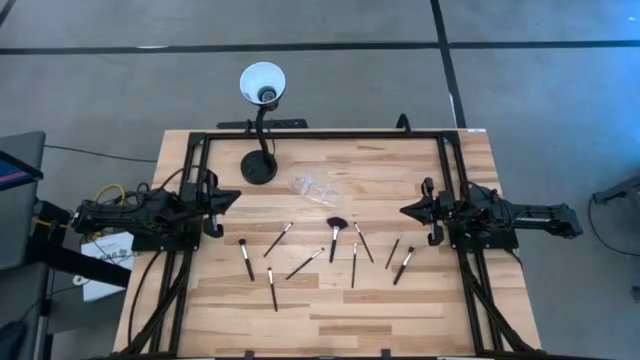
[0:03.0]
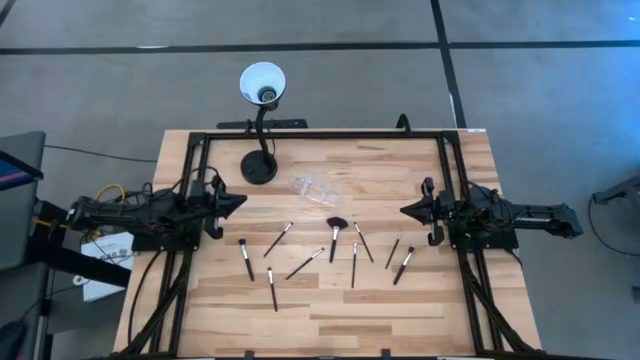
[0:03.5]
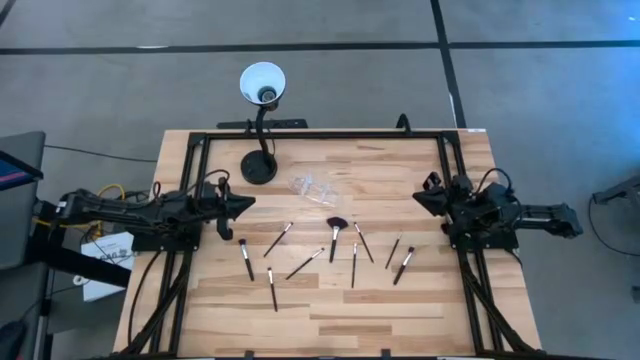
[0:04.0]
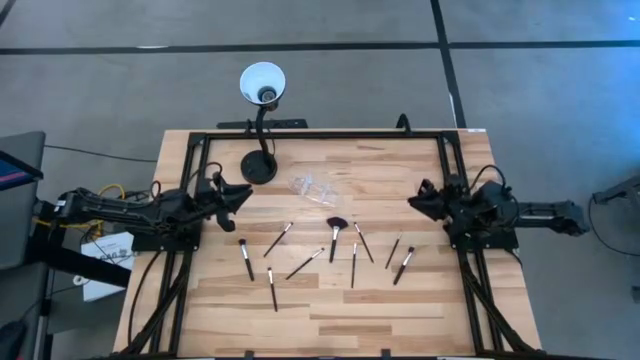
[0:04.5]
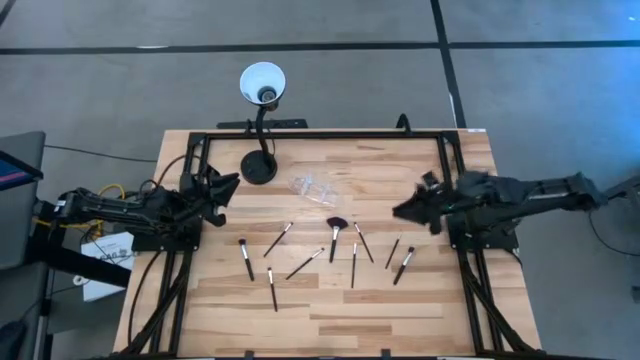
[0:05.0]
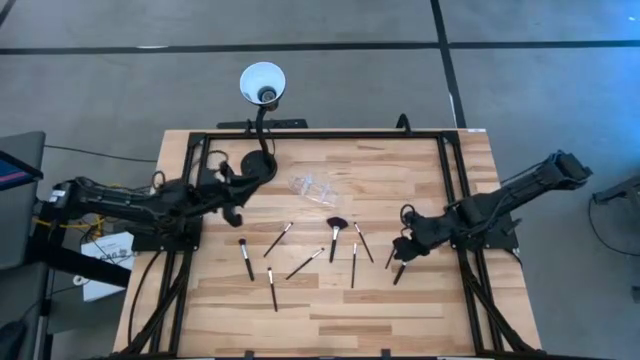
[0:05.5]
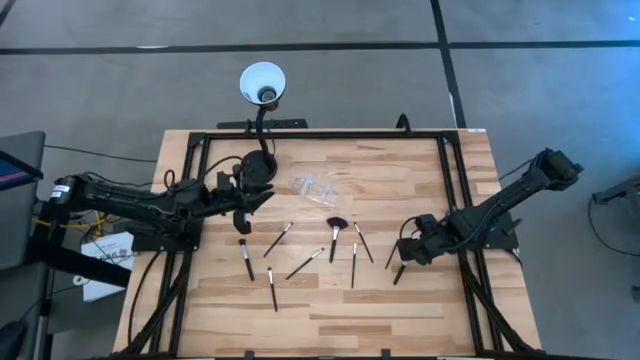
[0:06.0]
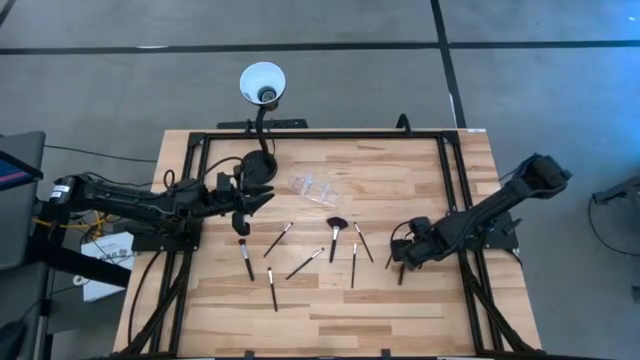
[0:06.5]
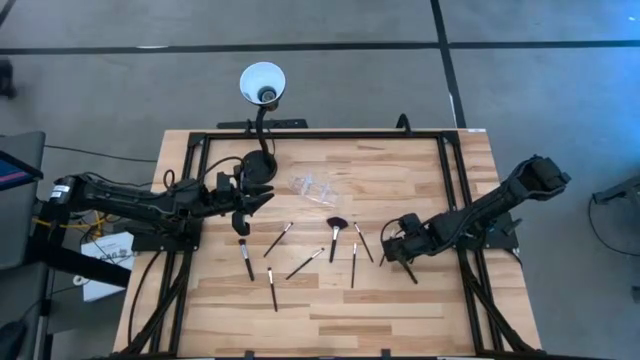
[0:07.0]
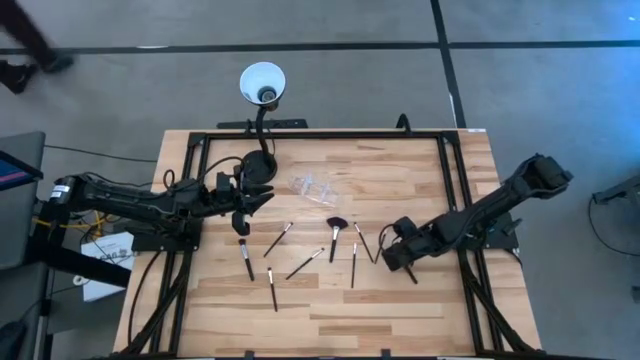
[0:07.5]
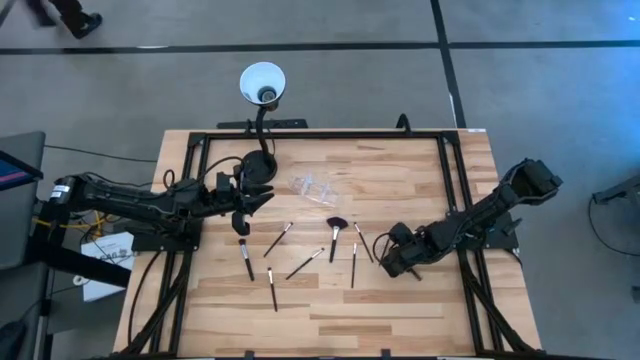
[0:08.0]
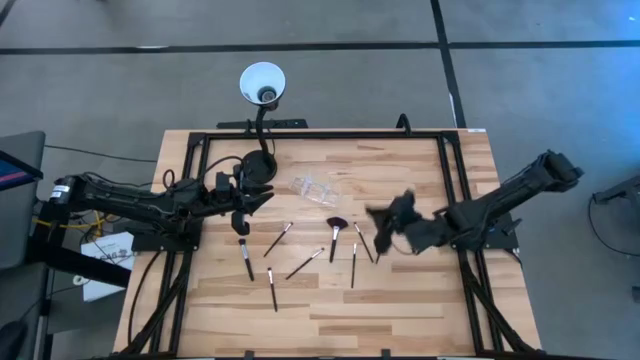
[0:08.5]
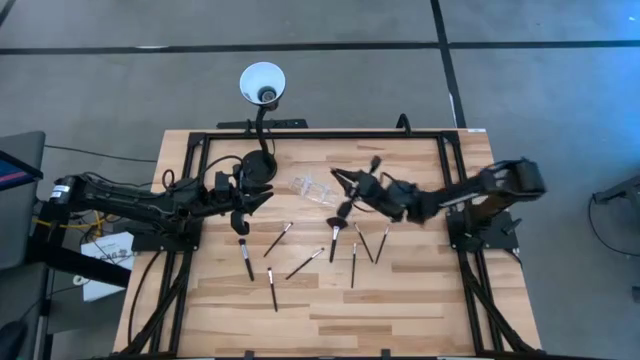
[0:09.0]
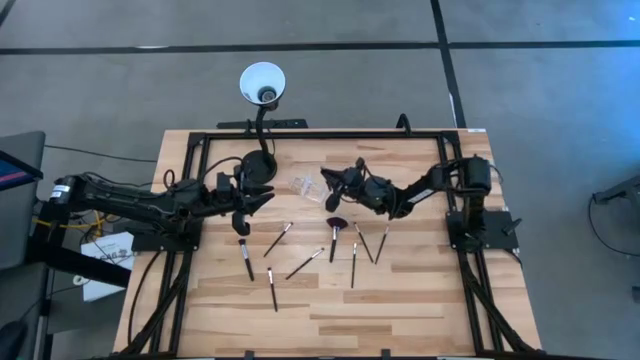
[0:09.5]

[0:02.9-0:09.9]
Task: Sort items
Put the right powder brush into the right section of the transparent organizer

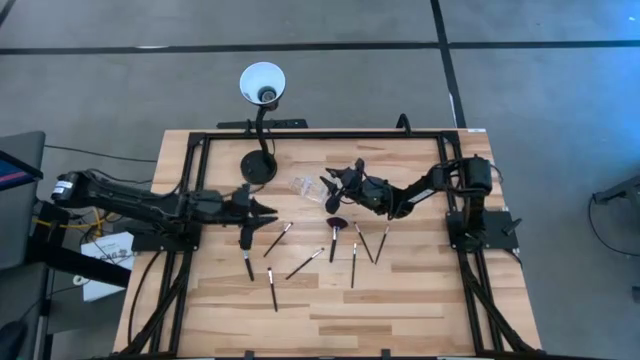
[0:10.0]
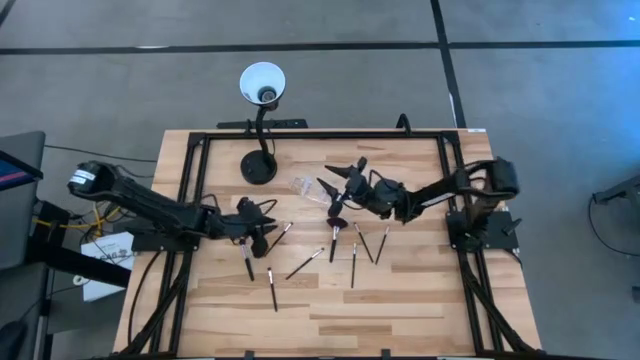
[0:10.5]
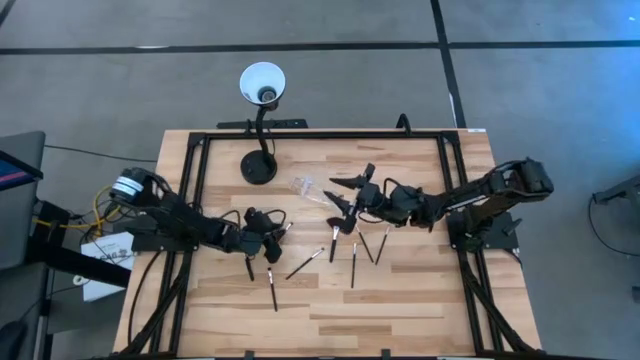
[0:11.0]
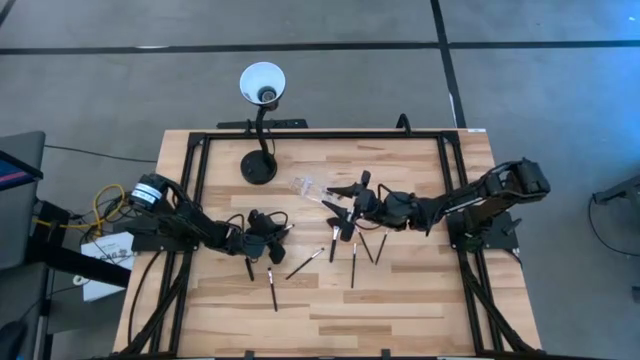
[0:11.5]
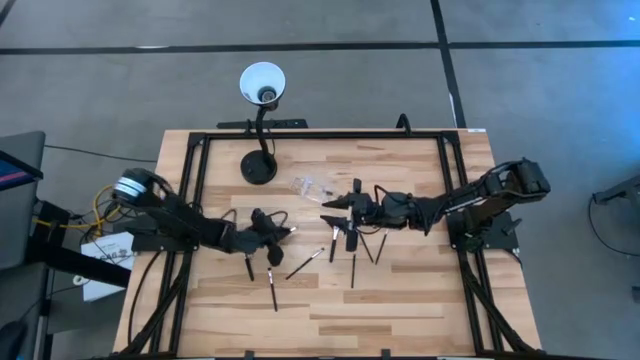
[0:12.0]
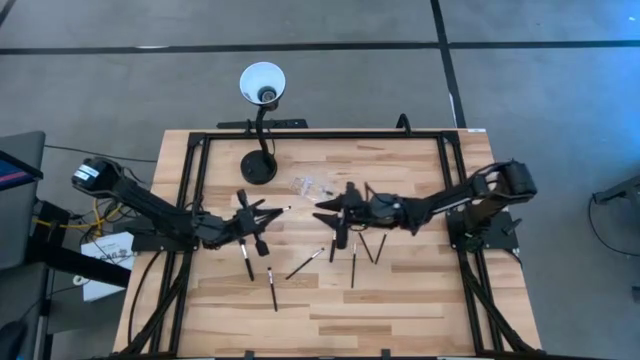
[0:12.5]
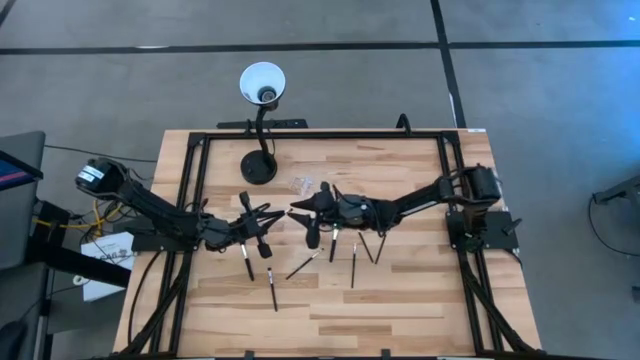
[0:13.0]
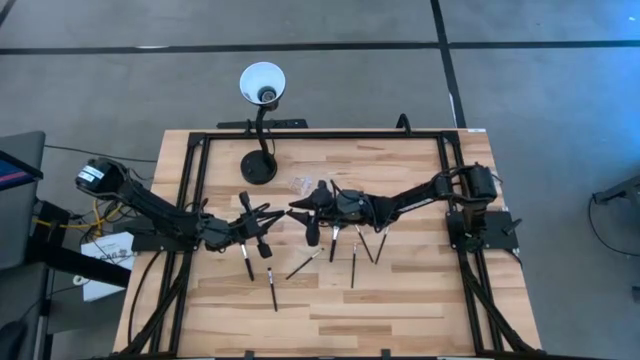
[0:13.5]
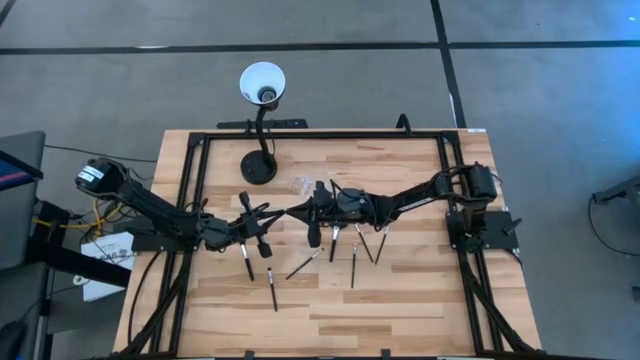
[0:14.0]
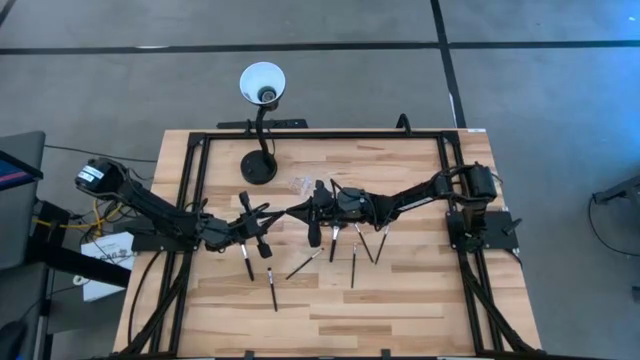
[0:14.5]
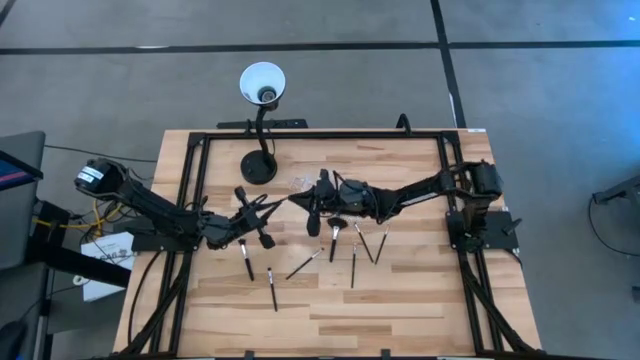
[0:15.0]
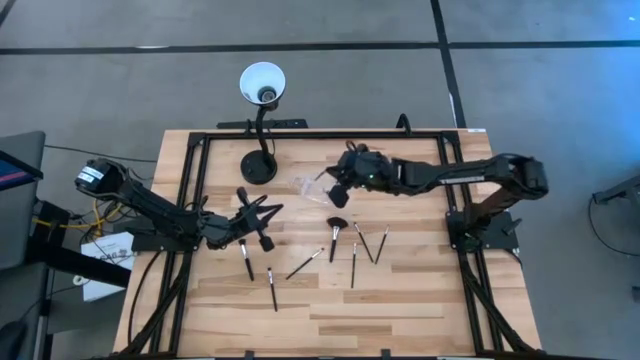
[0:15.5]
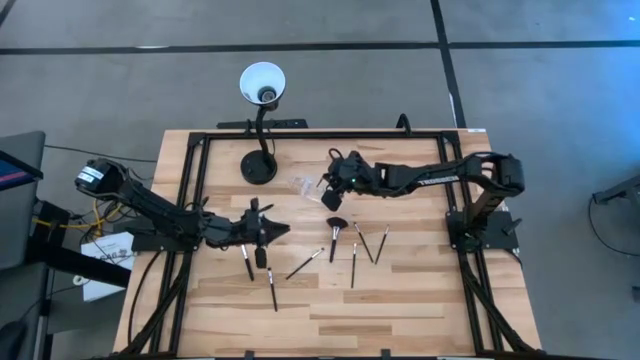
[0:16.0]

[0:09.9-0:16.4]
Put the eyeshadow brush into the middle section of the transparent organizer

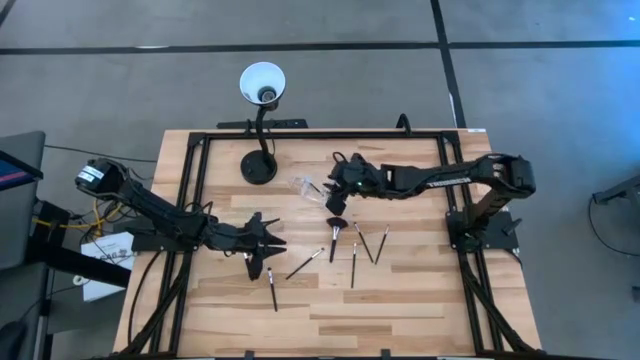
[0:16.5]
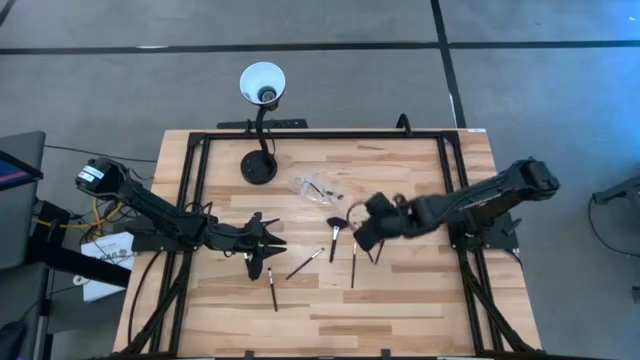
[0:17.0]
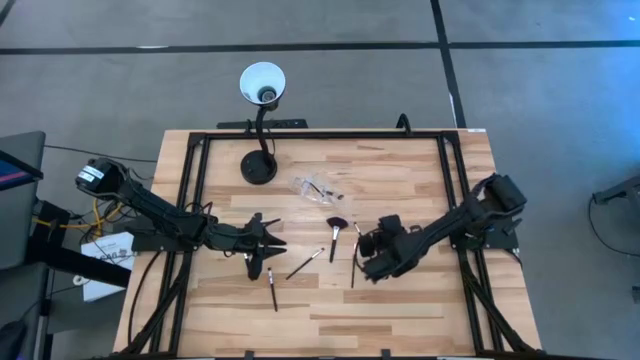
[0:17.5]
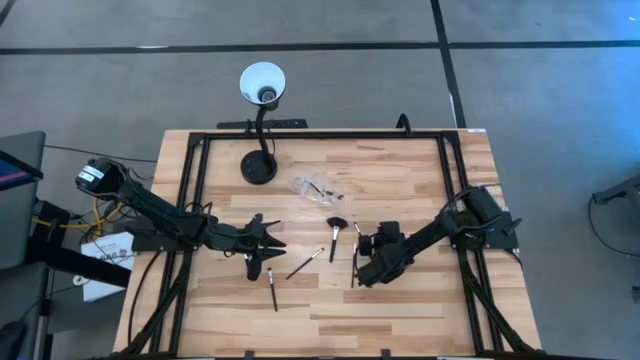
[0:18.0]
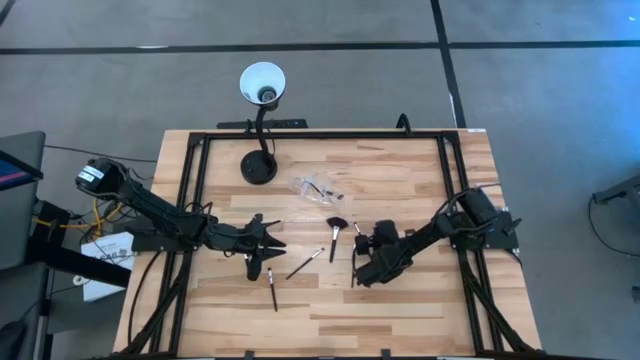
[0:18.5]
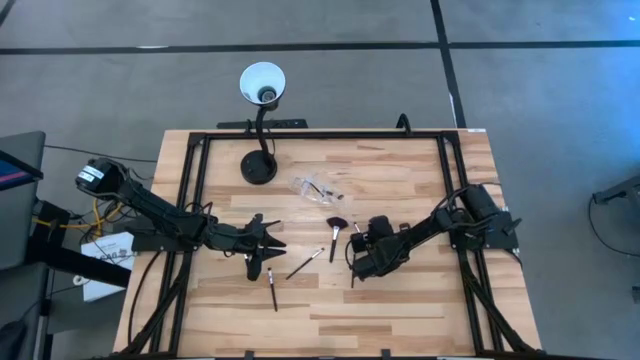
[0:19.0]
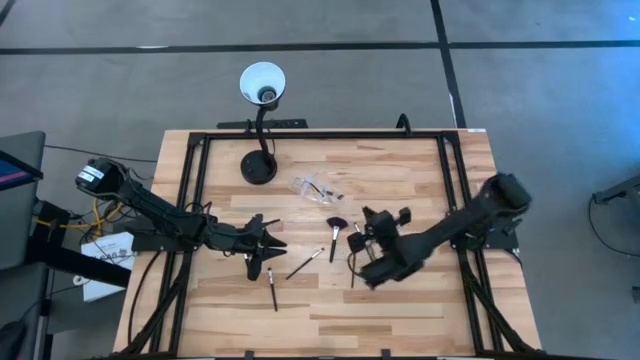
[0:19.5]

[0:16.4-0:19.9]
Put the eyeliner brush into the left section of the transparent organizer

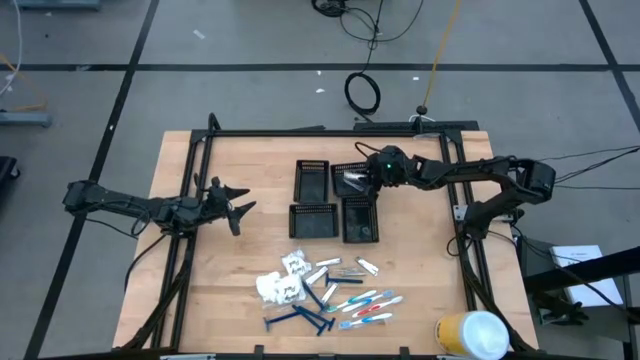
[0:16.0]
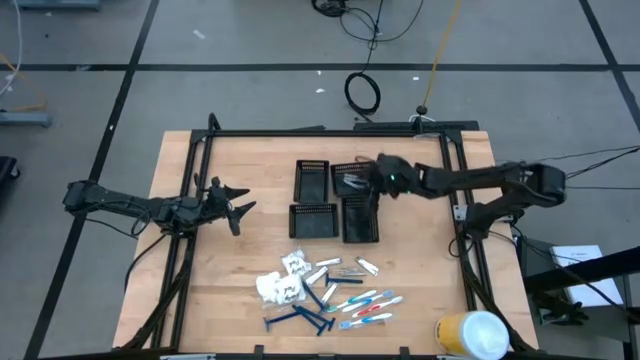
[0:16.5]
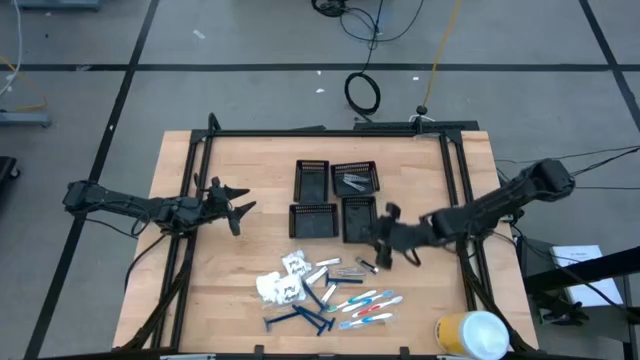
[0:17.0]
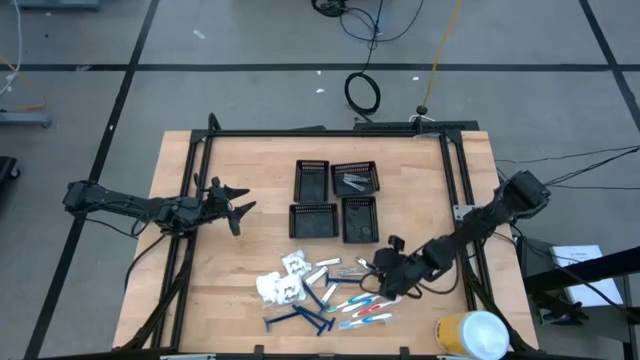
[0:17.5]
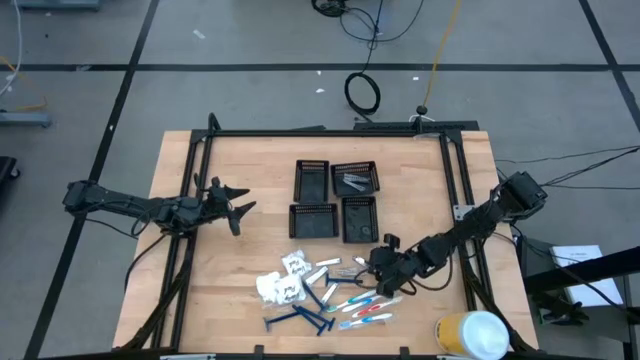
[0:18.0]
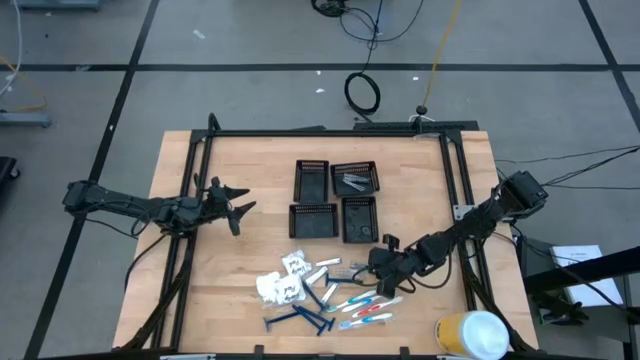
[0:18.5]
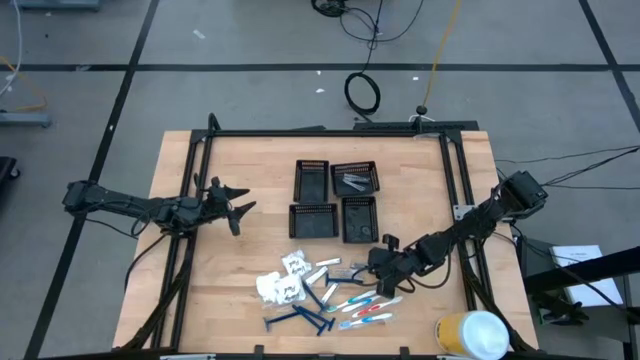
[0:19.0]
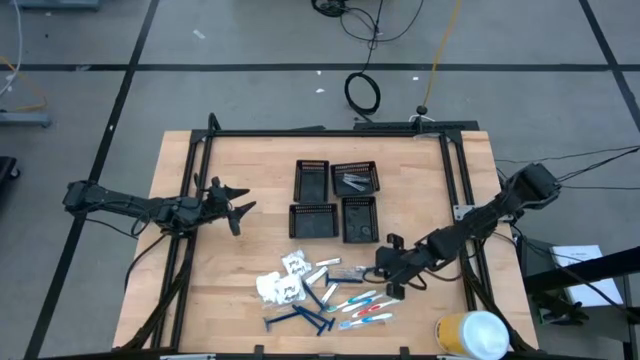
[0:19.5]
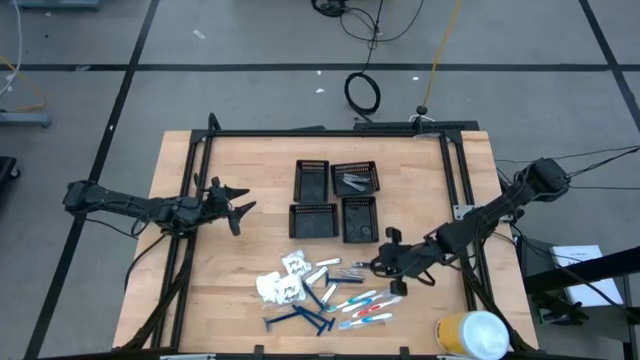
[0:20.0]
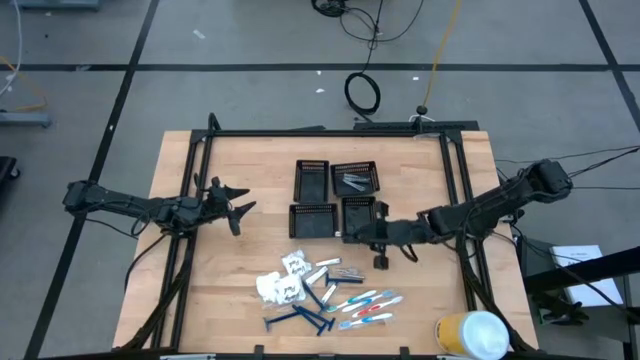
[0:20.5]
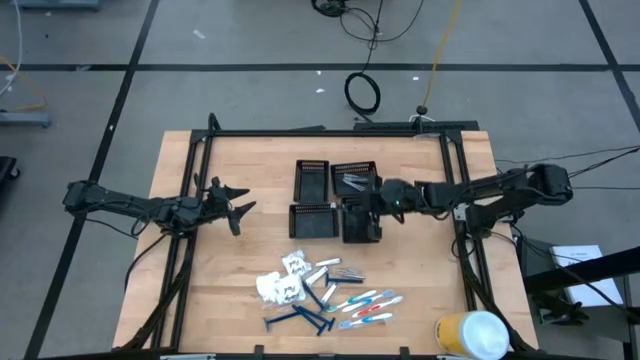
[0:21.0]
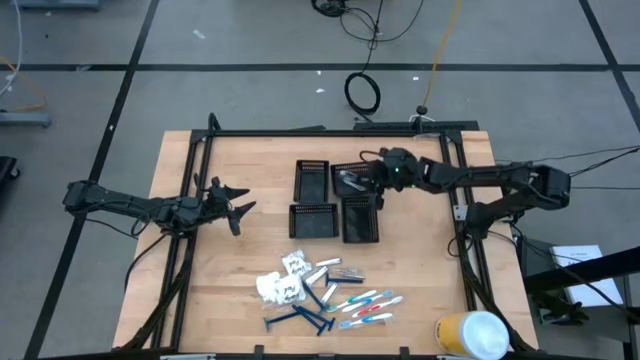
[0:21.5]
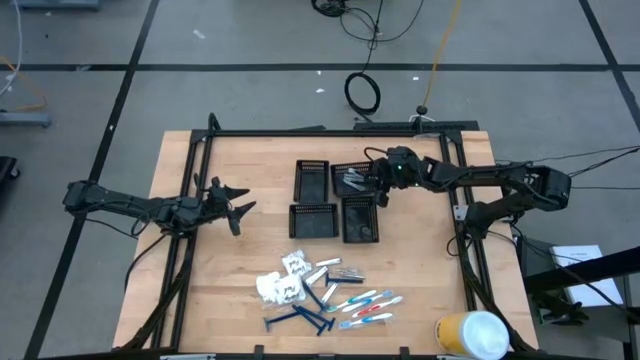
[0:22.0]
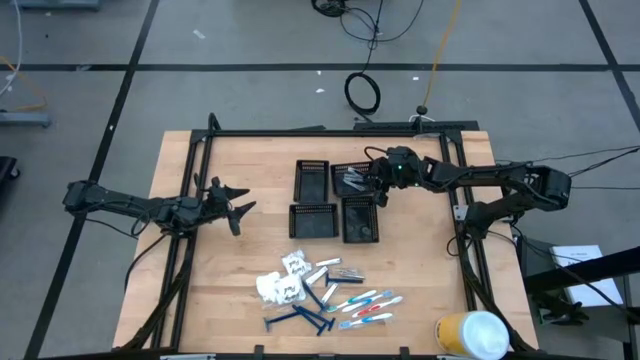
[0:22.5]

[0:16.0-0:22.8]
Task: Pick & Place Travel size toiletries
Put the silver nail cutter into the top right black bin
